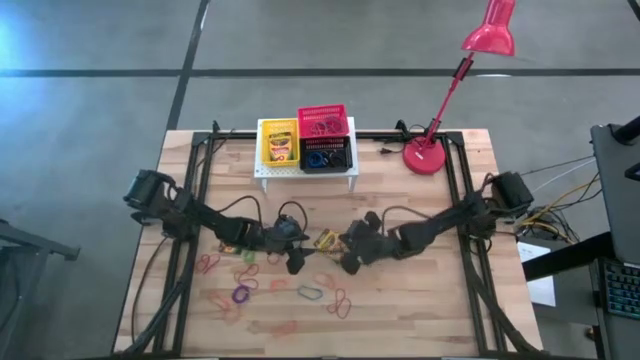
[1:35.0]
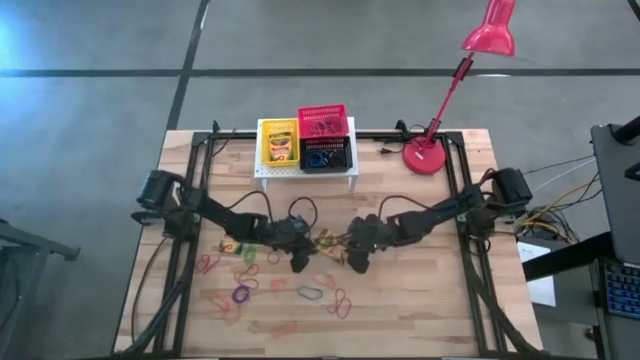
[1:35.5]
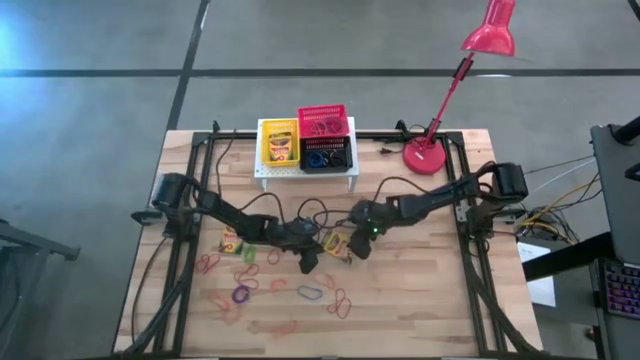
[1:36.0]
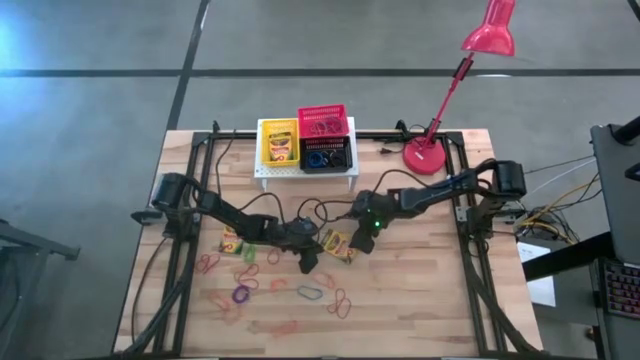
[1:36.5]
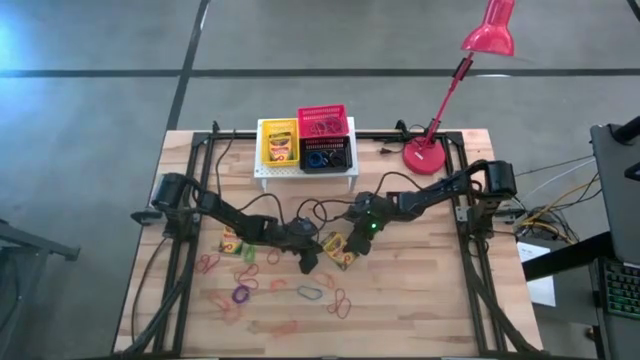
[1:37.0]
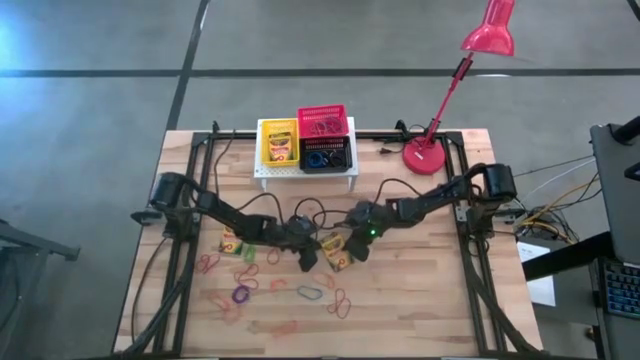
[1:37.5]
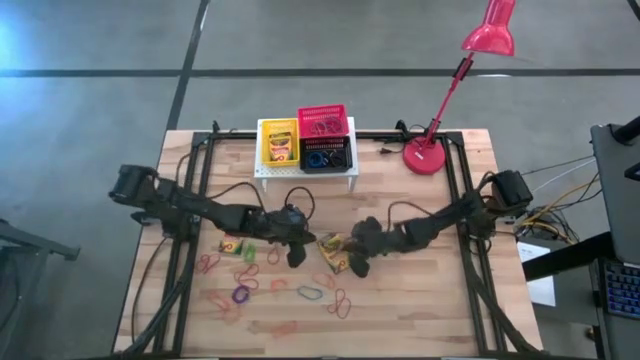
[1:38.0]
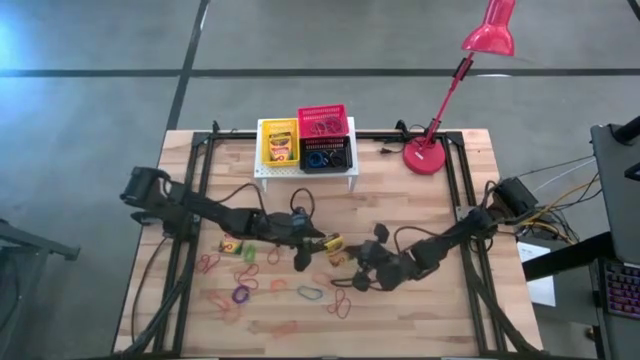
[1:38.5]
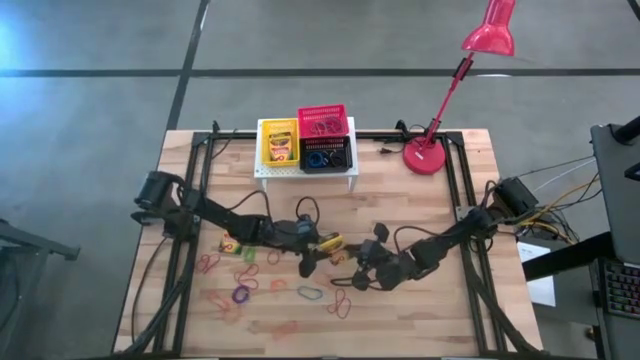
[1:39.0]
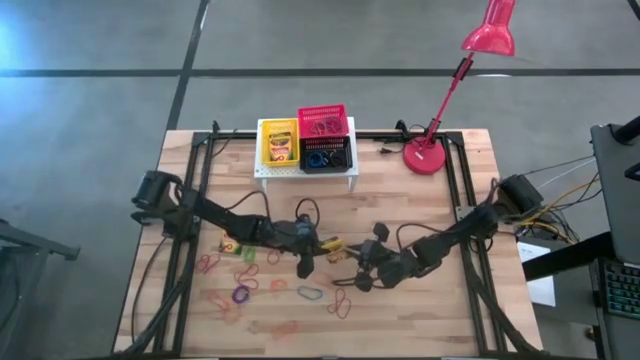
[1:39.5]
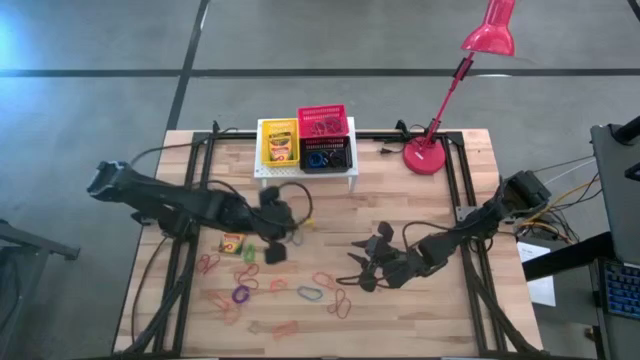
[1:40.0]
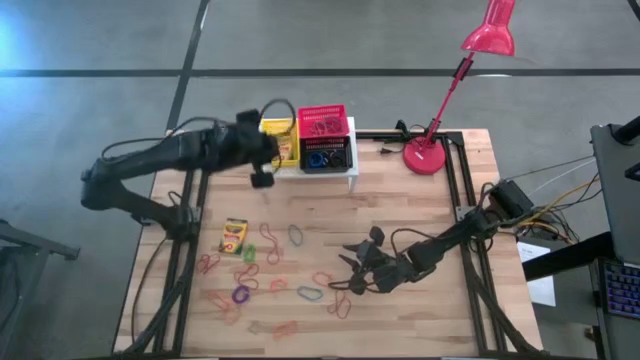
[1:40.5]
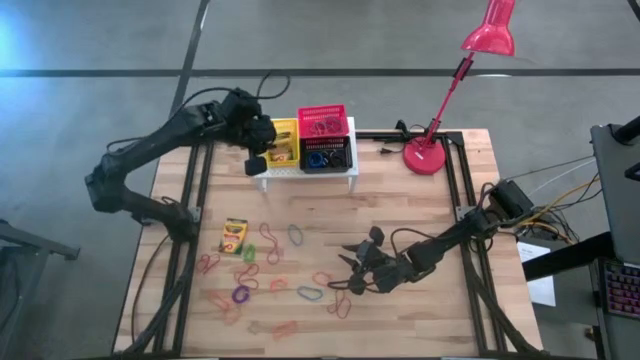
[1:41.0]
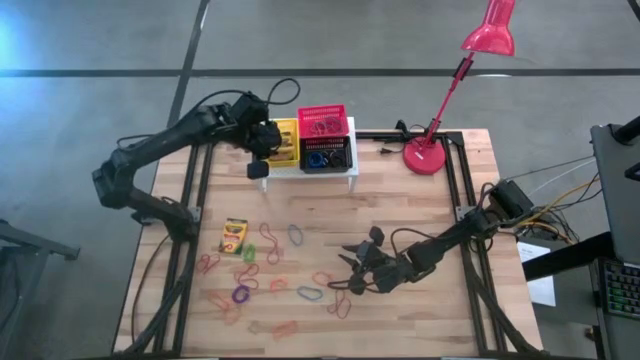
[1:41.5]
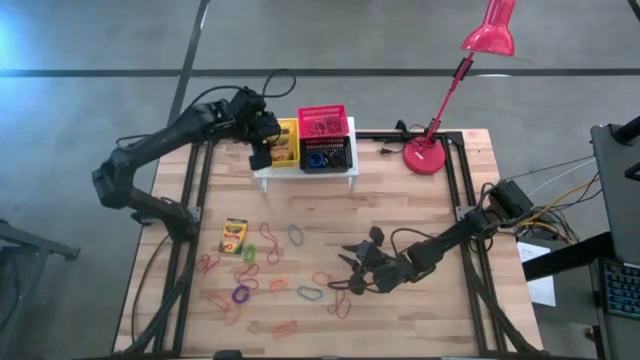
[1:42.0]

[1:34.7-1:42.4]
Task: Pick & Place Office Desk Supplies
Put the crayon box into the yellow bin

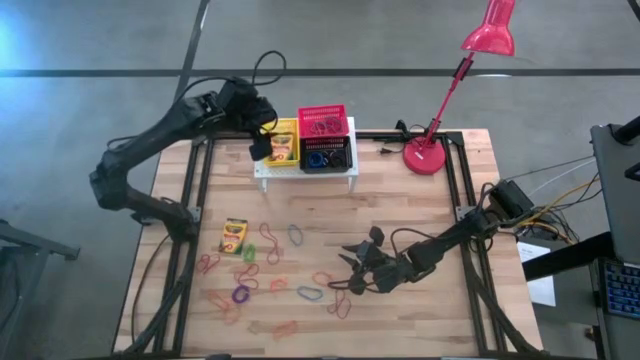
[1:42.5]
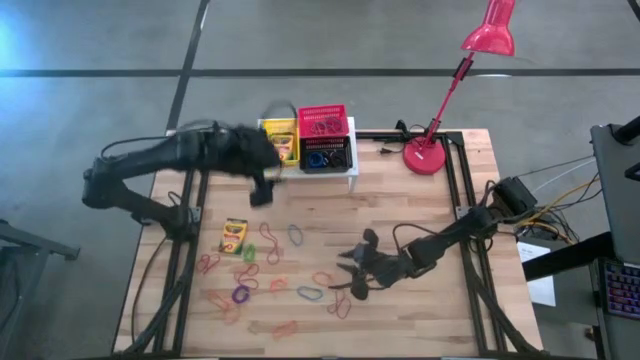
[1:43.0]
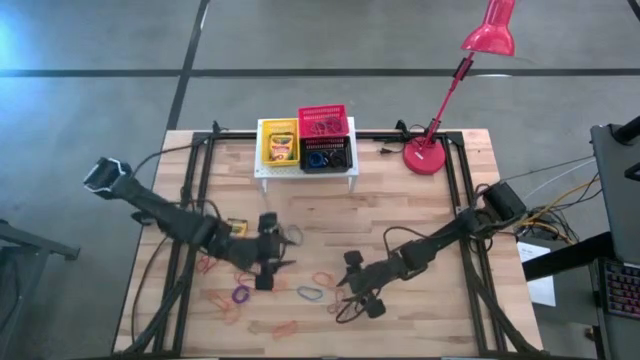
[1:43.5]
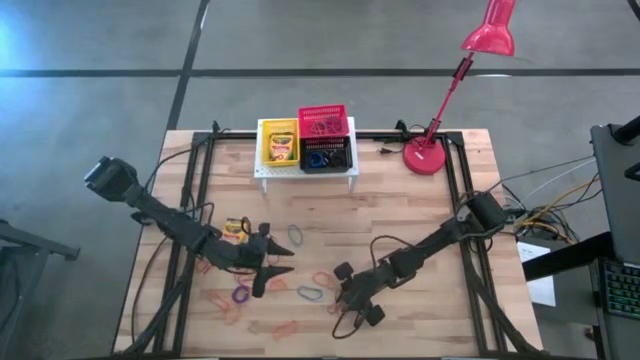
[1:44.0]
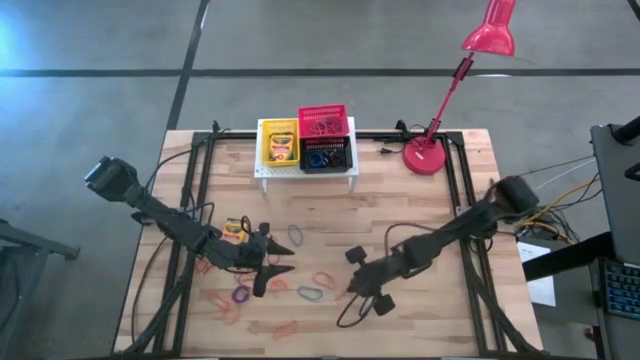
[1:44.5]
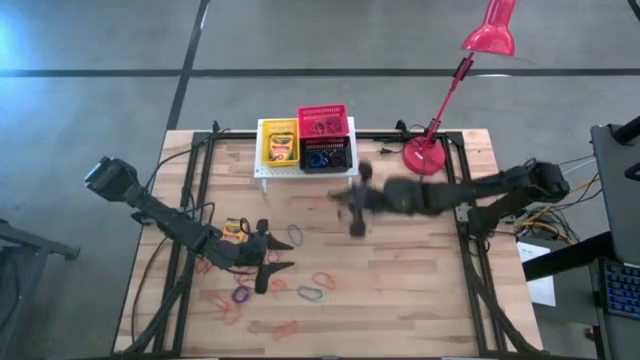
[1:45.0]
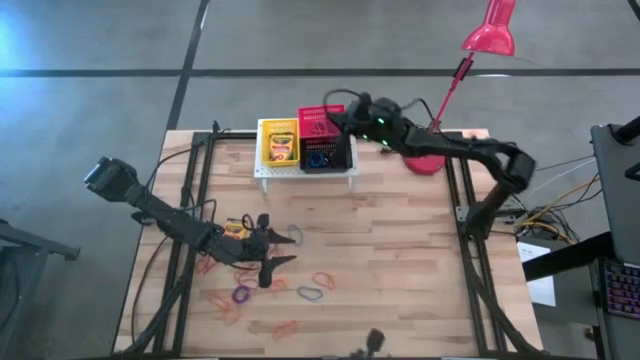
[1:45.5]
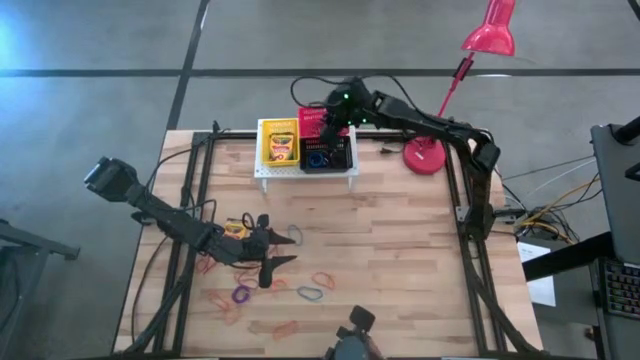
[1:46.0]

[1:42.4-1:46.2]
Put the red rubber band into the red bin

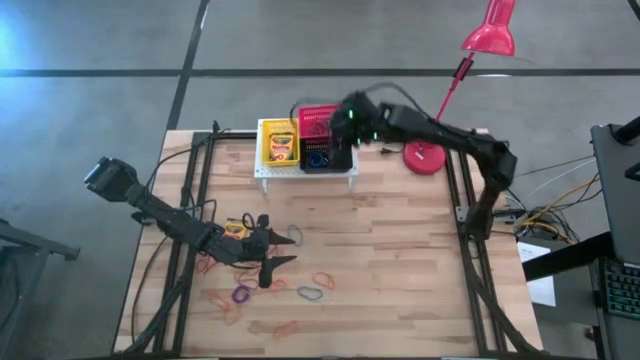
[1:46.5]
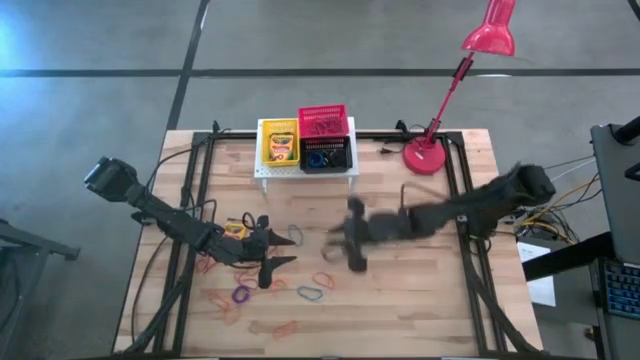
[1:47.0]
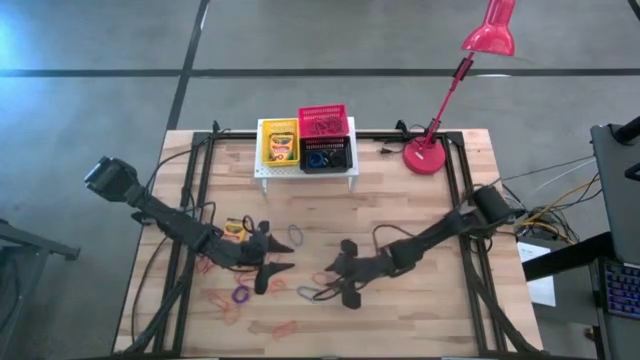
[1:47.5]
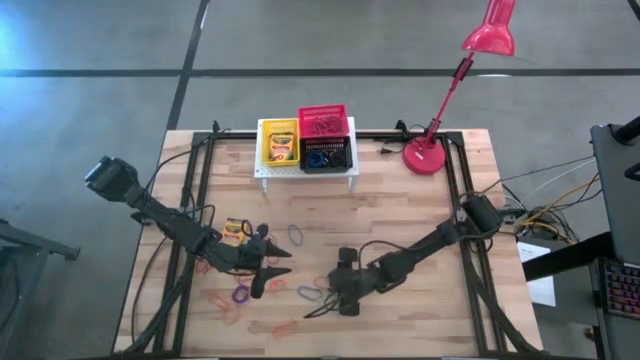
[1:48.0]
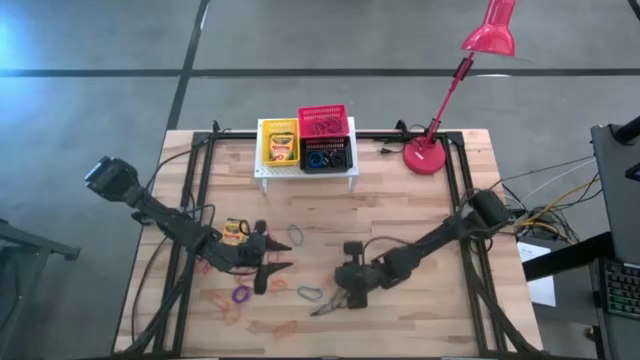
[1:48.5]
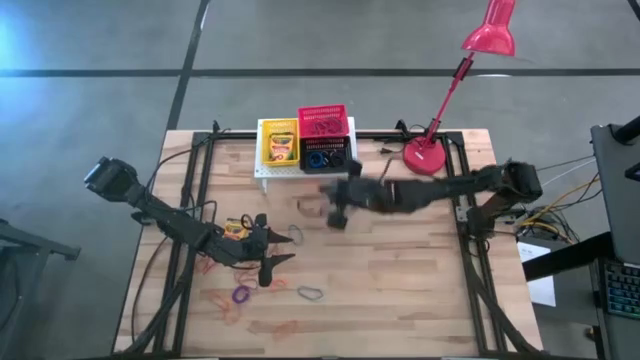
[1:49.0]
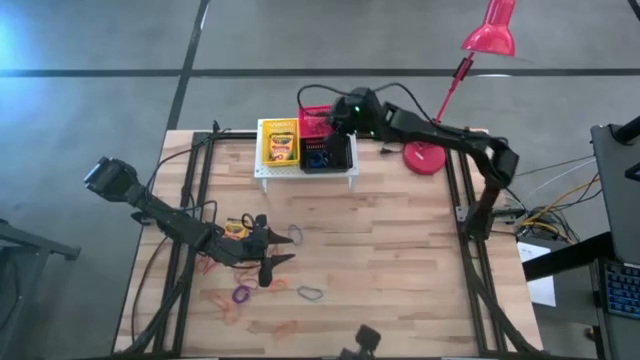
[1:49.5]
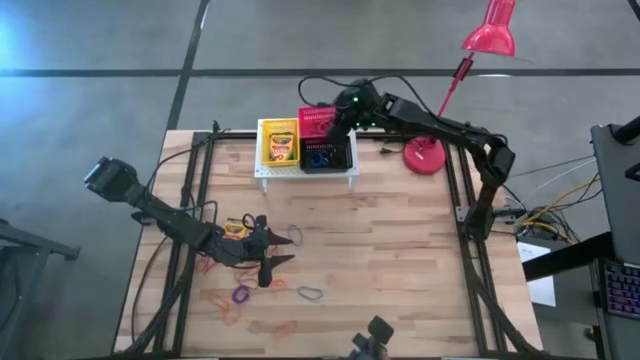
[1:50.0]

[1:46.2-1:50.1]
Put the orange rubber band into the red bin

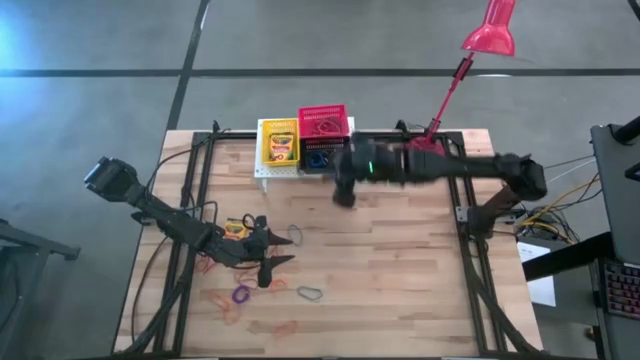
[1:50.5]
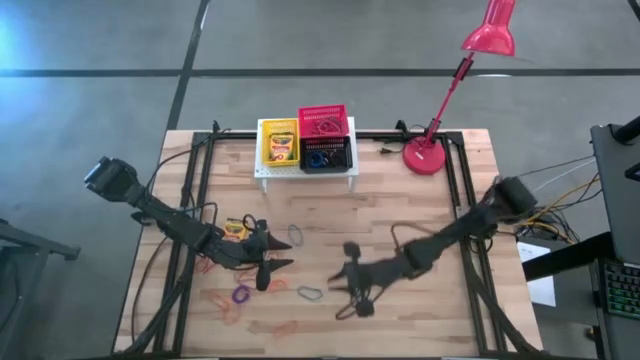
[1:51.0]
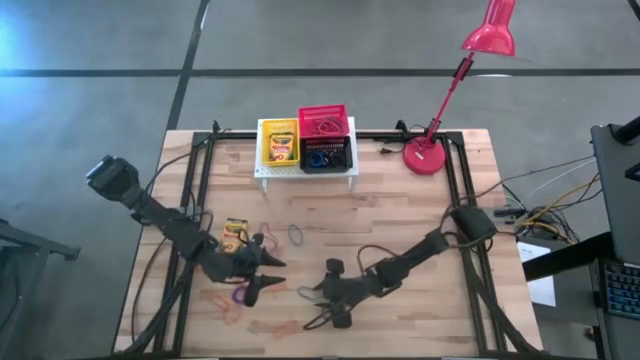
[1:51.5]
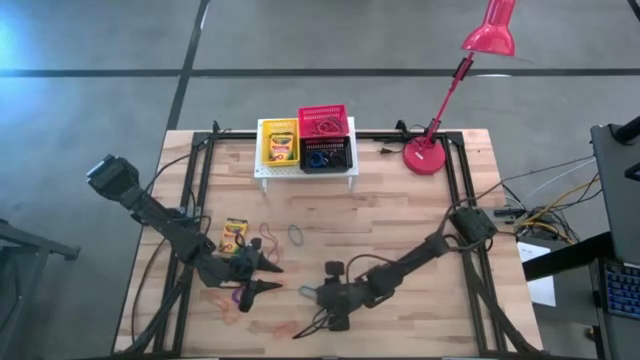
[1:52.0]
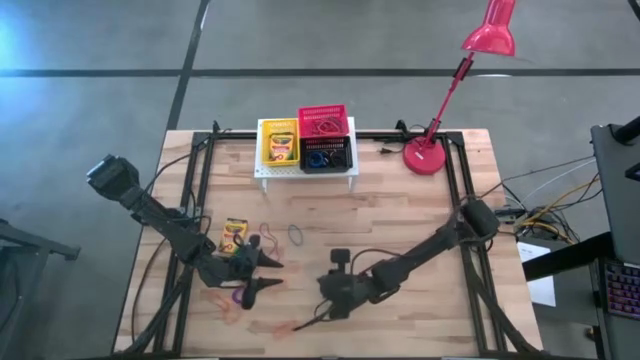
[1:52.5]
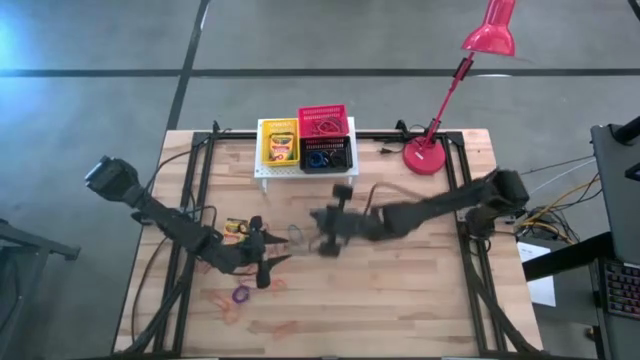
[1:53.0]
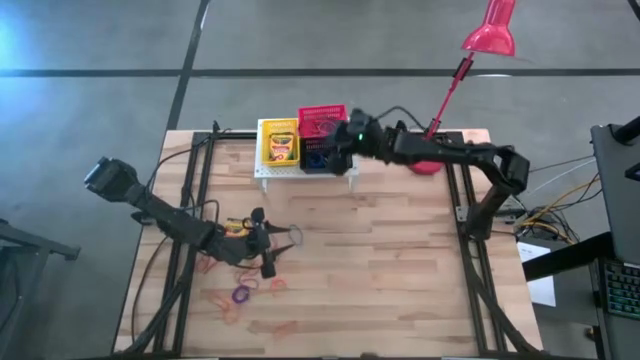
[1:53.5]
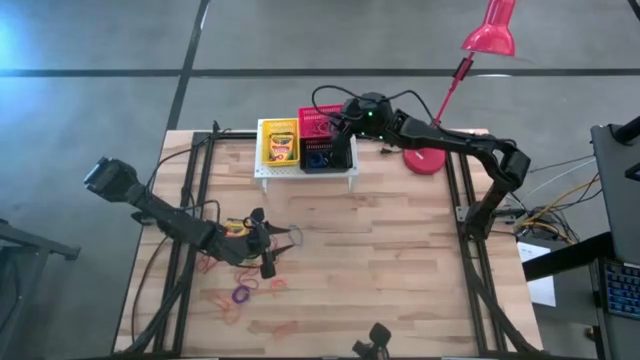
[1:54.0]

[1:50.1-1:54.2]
Put the blue rubber band into the red bin

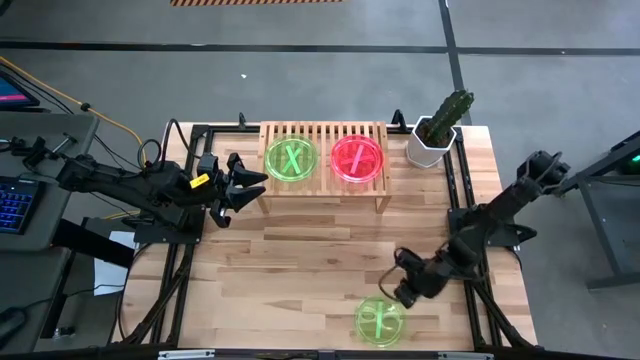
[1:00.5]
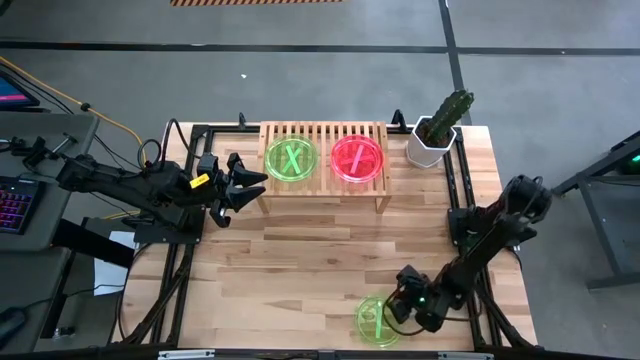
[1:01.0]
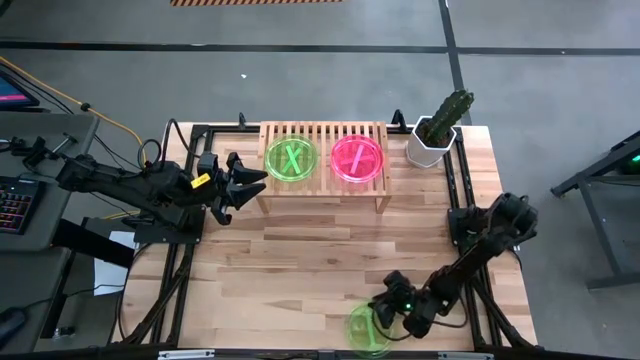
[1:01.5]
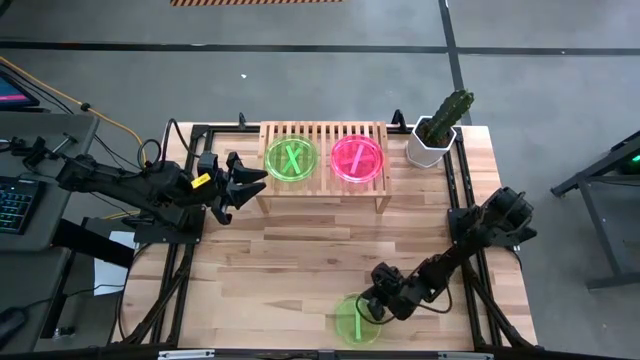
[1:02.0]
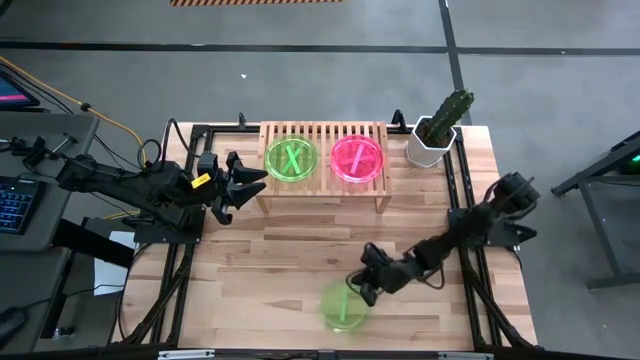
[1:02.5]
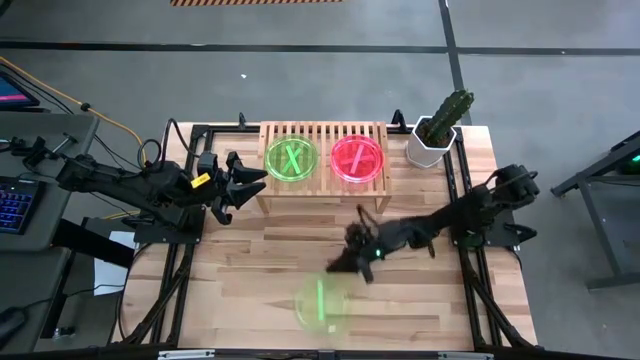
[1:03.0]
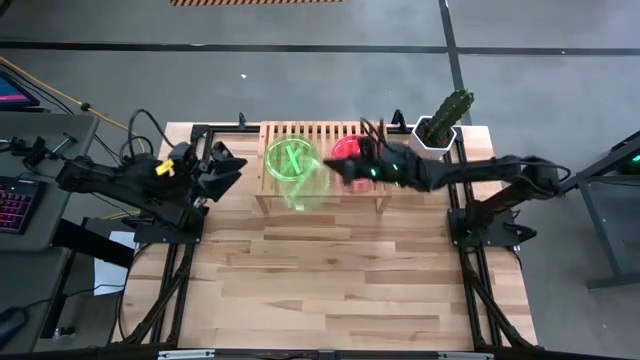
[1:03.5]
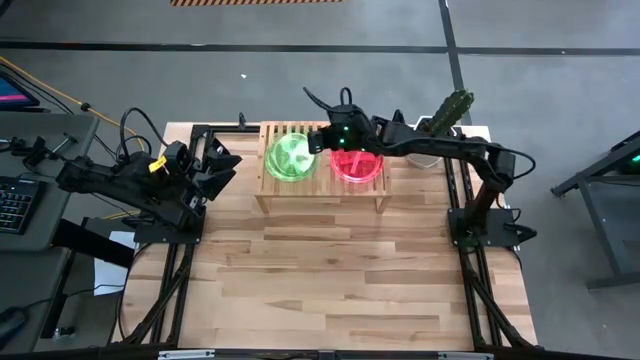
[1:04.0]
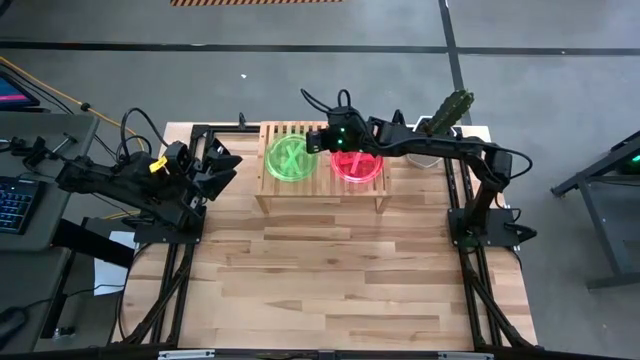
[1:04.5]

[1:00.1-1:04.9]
Task: Place and stack plates onto a shelf
Stack the green transparent plate on top of the stacked green transparent plates
